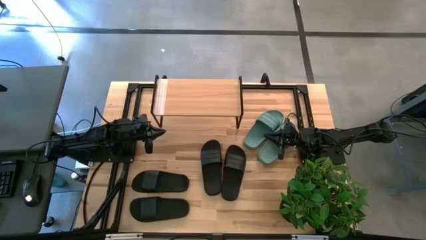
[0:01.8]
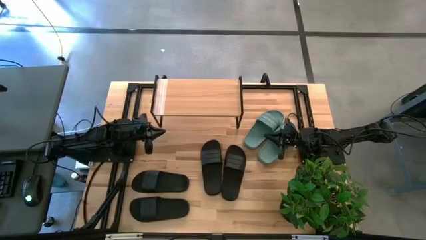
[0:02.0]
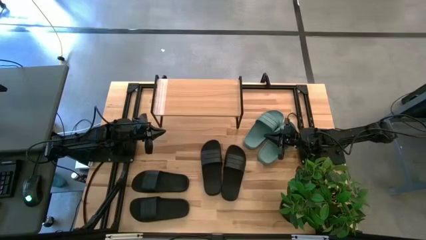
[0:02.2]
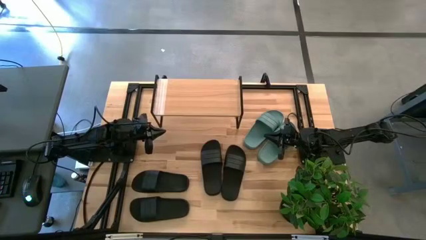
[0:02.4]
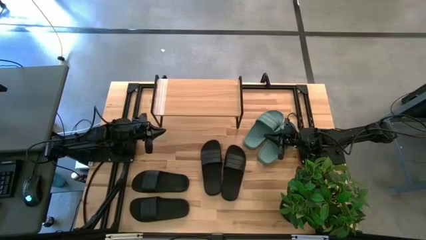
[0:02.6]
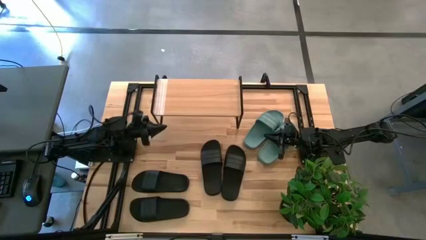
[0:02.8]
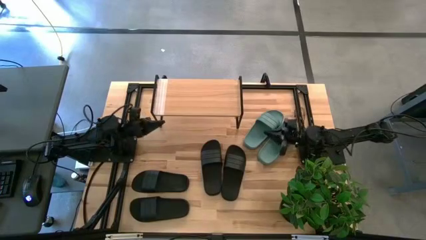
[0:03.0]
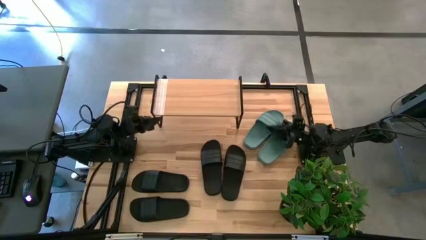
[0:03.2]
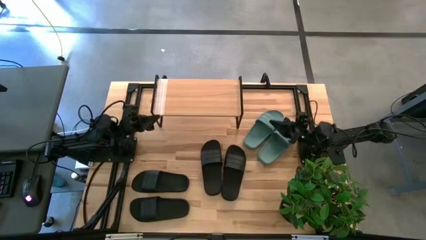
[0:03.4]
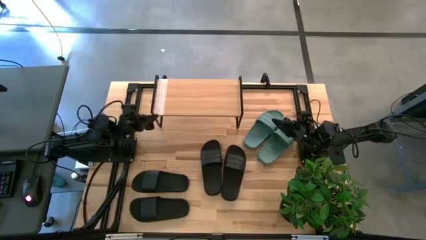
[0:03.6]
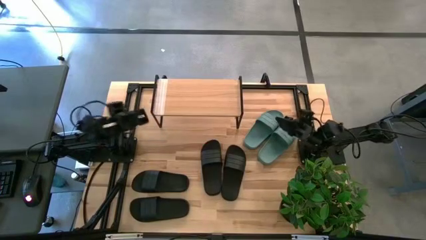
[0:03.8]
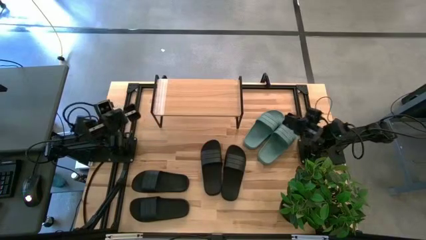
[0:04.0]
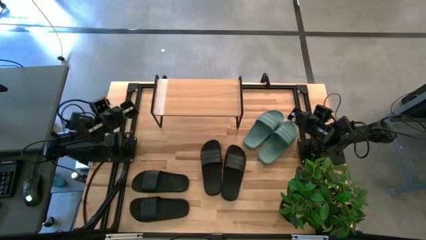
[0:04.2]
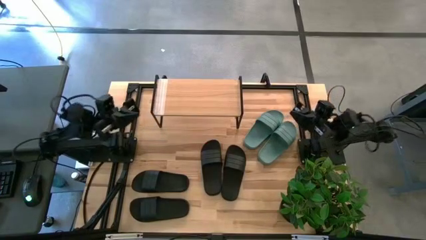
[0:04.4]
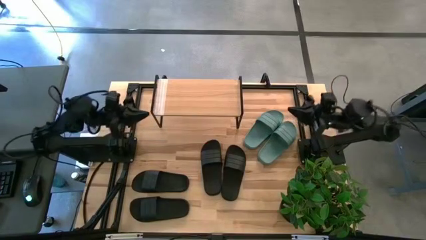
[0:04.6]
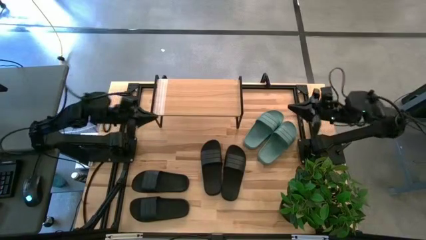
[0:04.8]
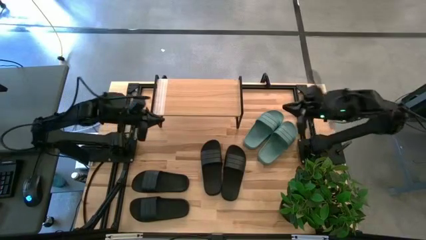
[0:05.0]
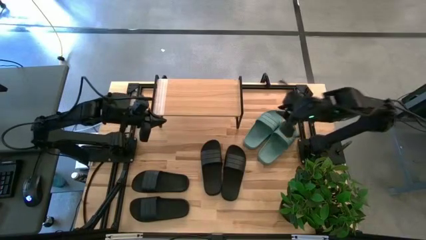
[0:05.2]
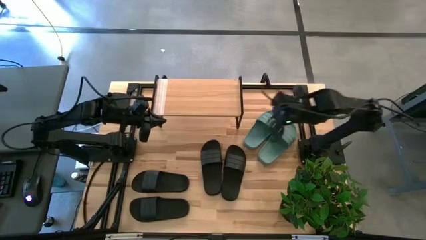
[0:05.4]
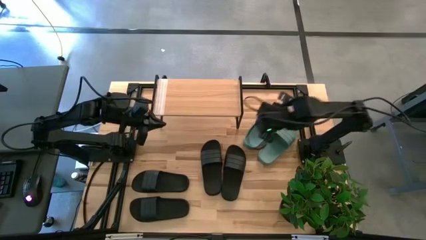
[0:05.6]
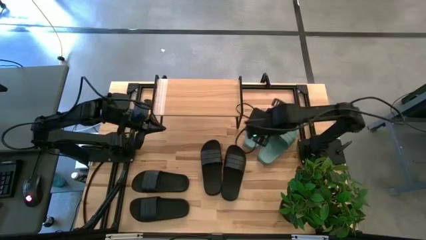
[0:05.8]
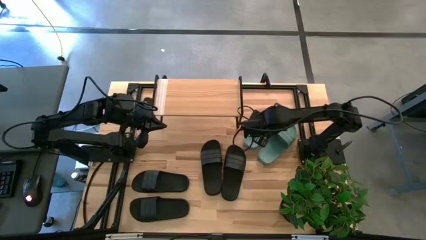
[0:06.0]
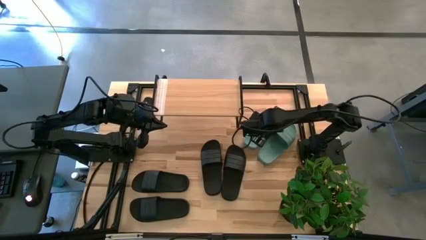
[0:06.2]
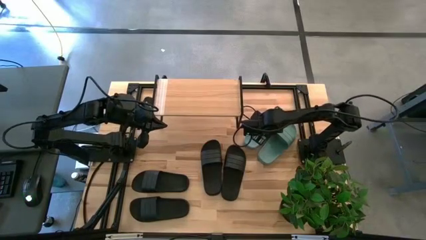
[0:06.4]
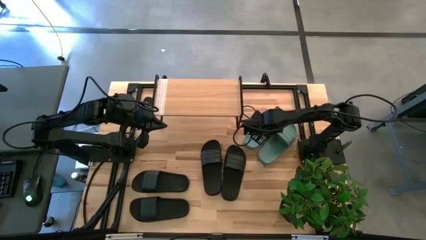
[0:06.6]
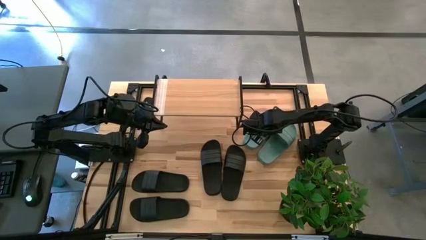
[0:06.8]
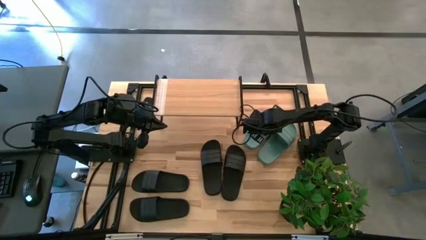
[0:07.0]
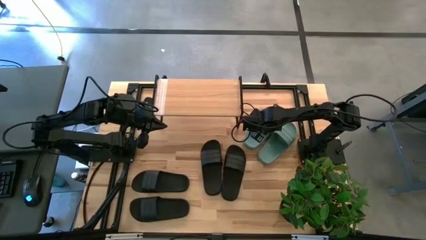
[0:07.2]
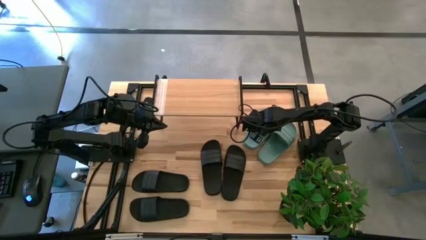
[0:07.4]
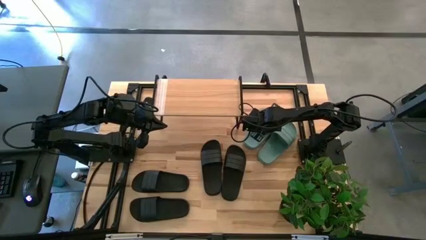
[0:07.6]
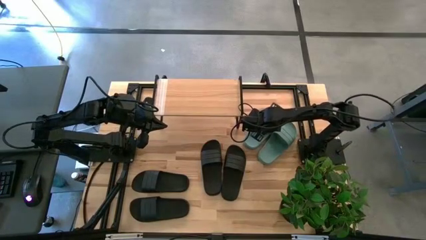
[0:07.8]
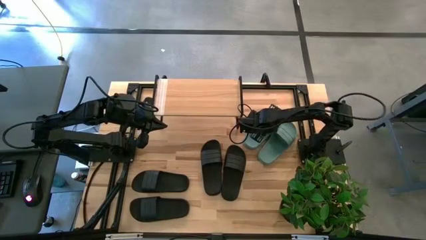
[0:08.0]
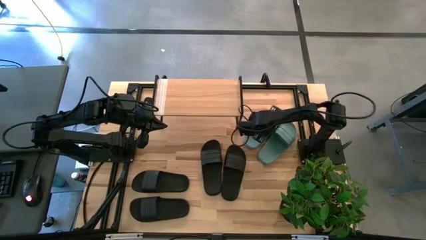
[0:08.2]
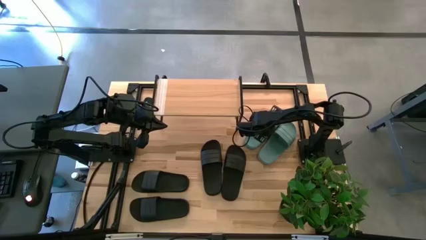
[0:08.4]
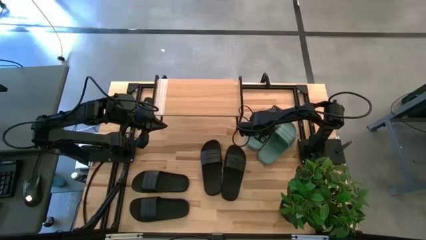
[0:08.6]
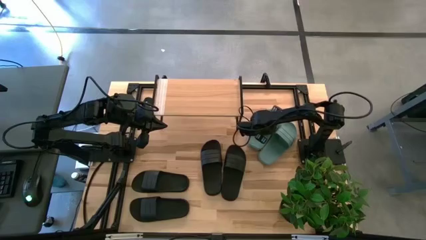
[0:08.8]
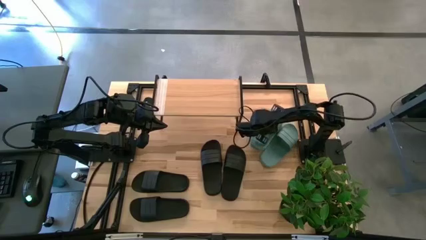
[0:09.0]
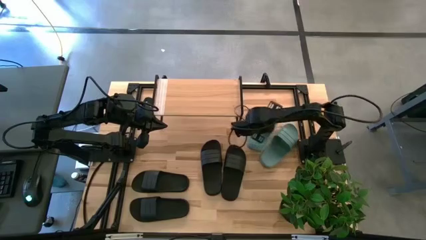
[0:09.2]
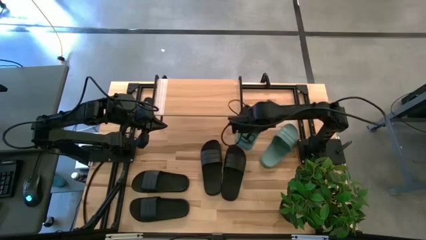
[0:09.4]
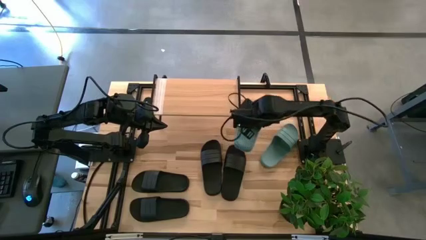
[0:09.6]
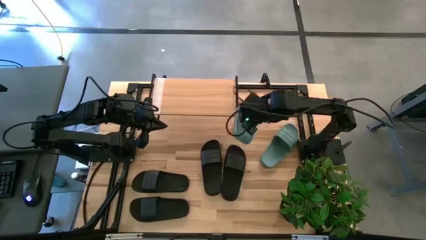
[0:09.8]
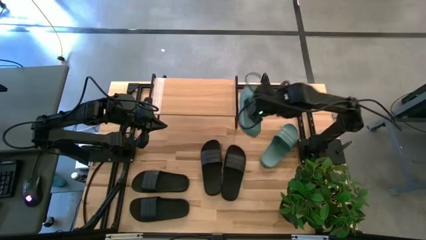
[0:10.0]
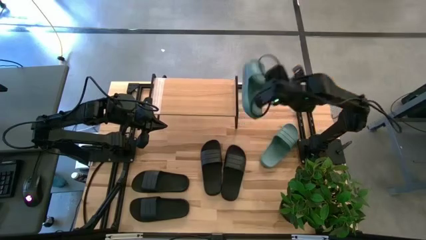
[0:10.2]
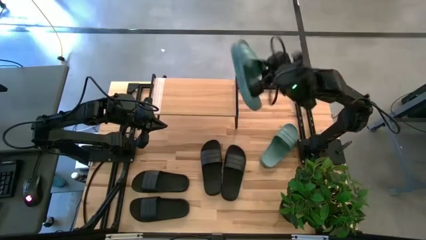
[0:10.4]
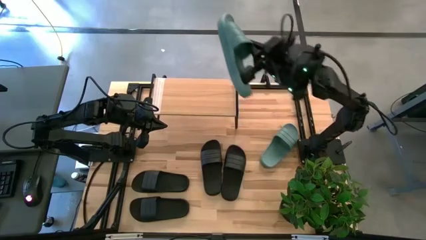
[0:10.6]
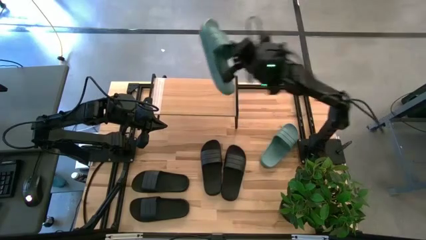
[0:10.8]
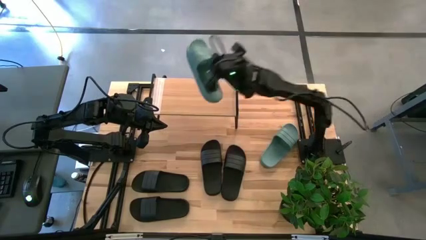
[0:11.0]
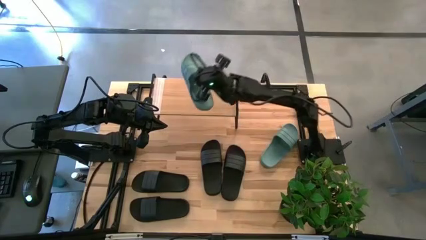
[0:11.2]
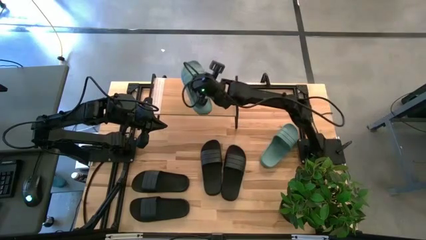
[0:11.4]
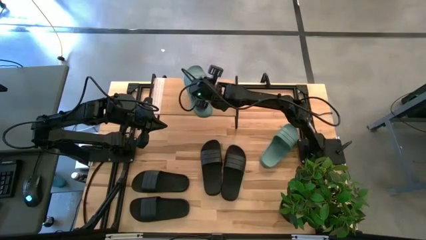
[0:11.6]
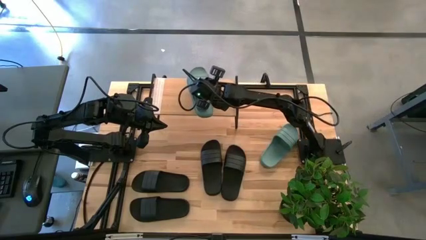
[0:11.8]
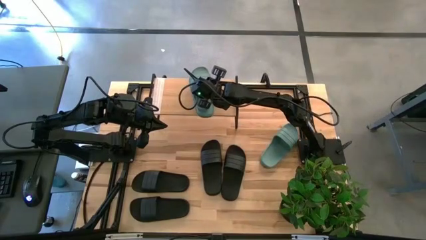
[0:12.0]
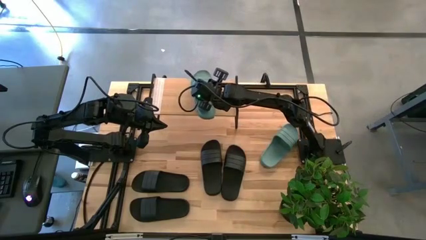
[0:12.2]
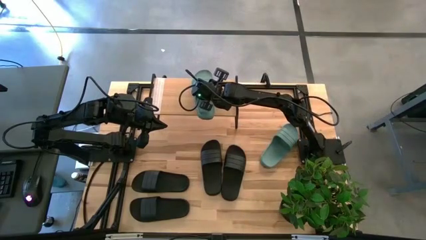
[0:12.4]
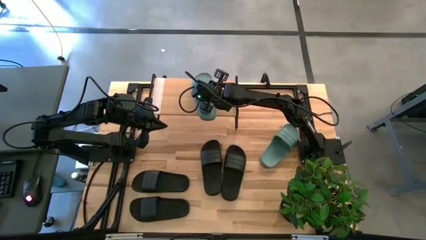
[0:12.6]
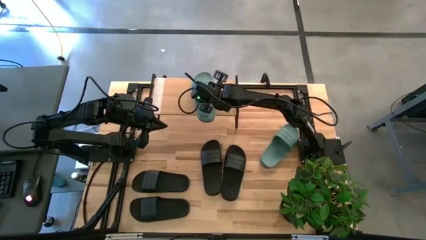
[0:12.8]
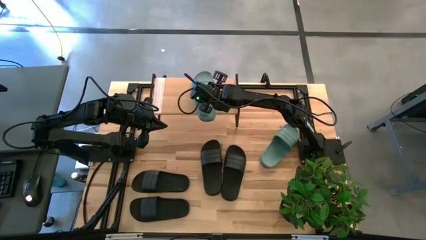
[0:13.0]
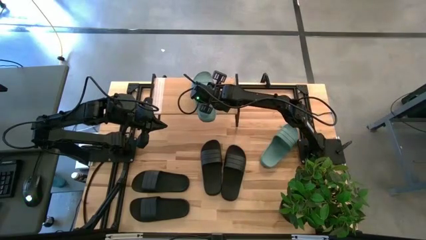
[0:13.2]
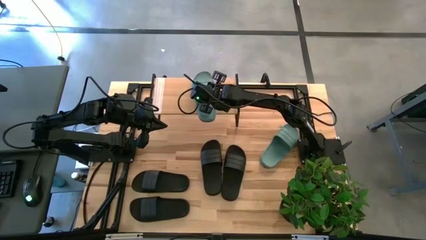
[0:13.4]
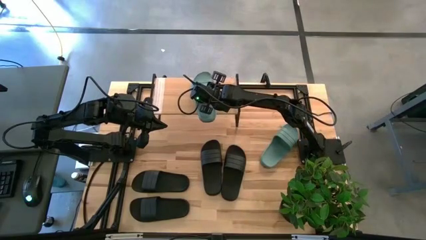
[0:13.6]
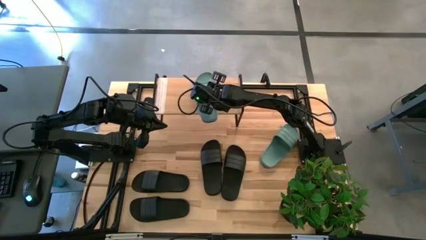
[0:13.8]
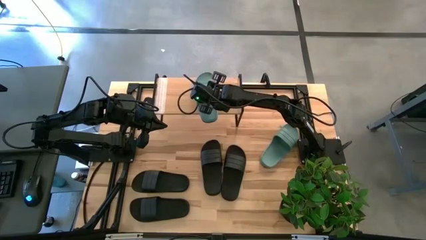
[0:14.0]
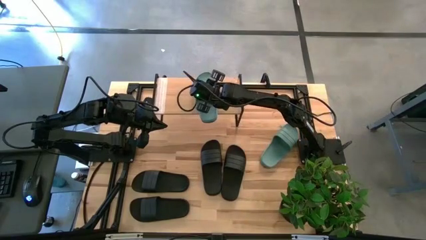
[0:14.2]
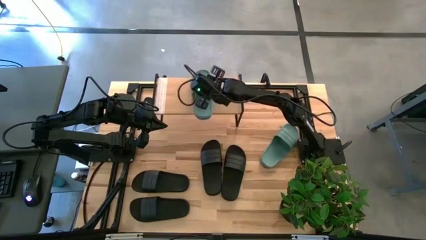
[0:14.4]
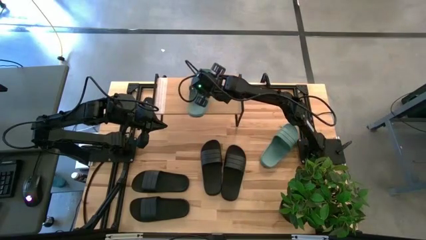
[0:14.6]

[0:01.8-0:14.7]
Task: Pick and place slides into the shelf
Put the green slide on the shelf
